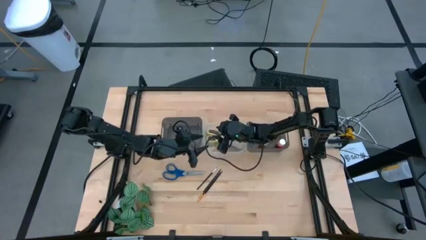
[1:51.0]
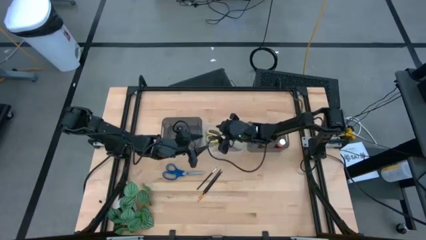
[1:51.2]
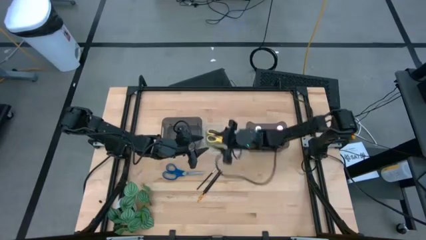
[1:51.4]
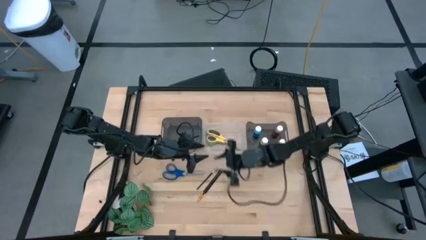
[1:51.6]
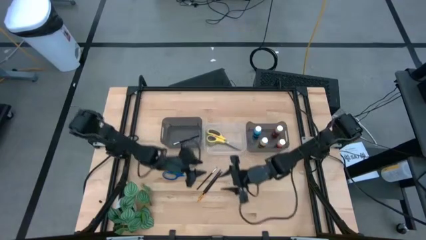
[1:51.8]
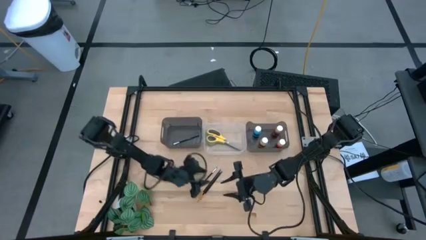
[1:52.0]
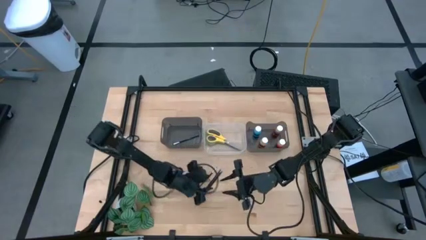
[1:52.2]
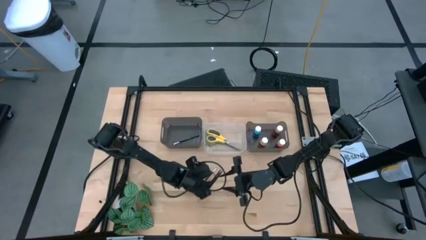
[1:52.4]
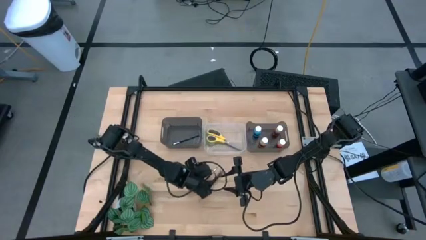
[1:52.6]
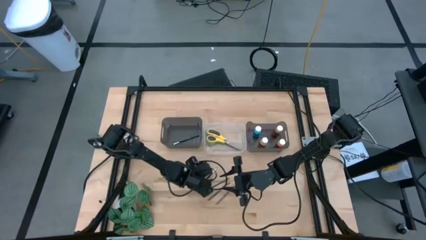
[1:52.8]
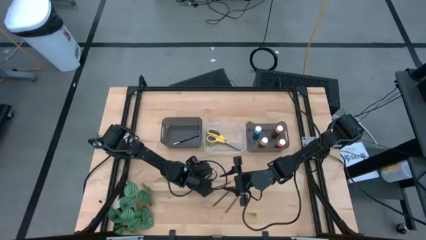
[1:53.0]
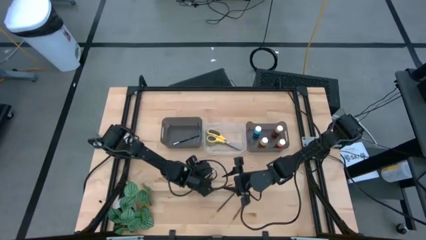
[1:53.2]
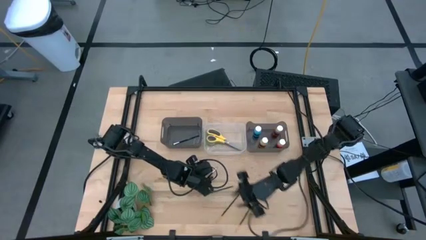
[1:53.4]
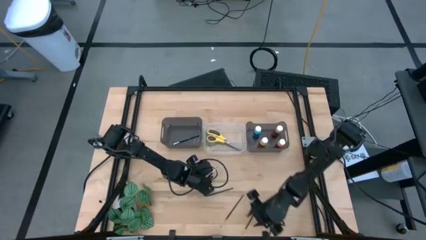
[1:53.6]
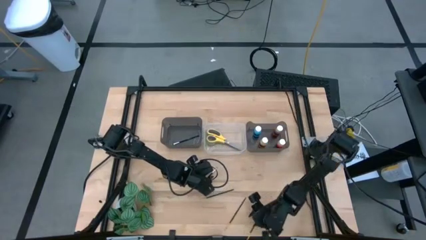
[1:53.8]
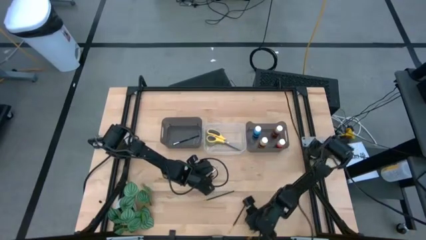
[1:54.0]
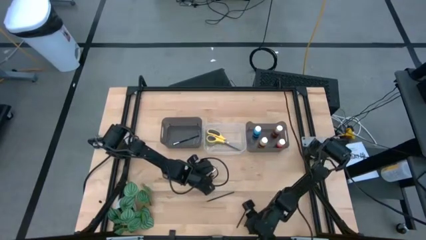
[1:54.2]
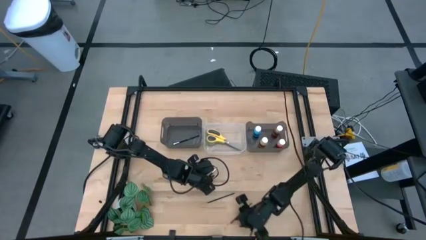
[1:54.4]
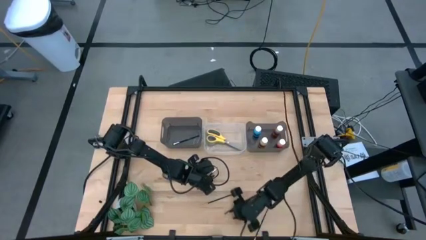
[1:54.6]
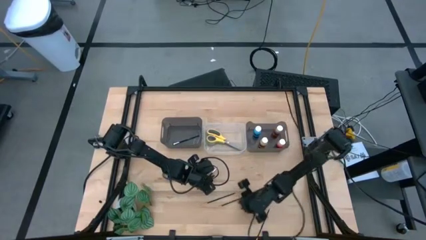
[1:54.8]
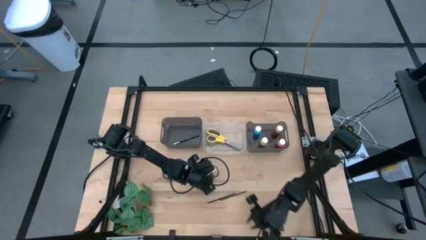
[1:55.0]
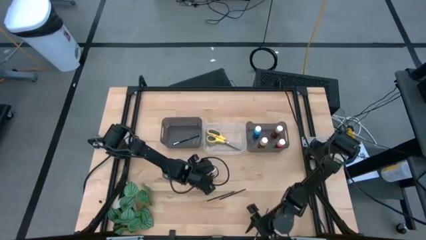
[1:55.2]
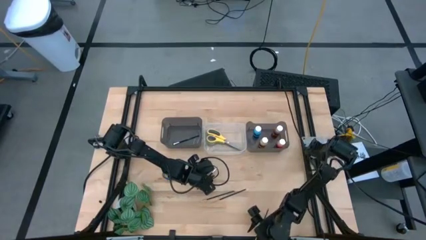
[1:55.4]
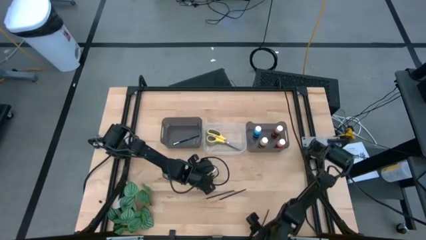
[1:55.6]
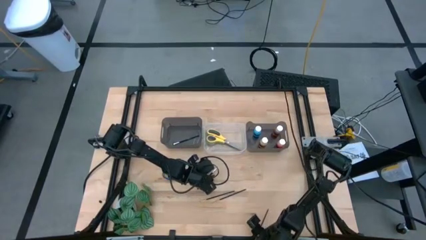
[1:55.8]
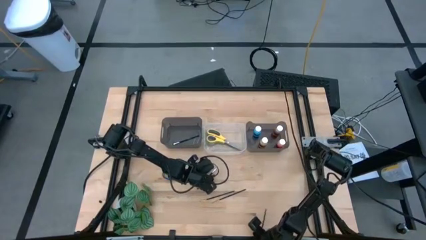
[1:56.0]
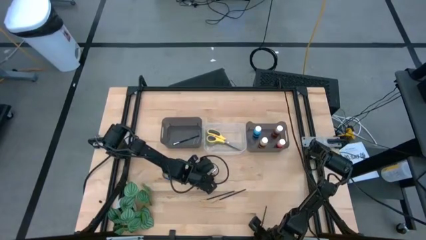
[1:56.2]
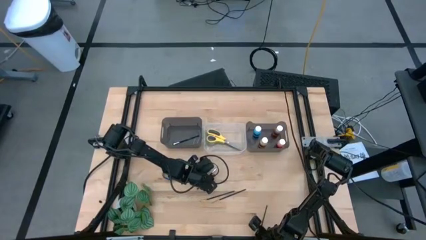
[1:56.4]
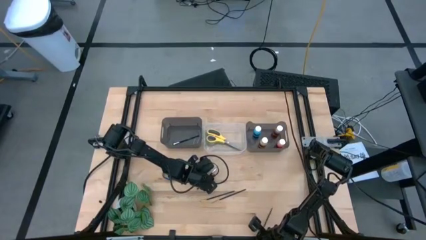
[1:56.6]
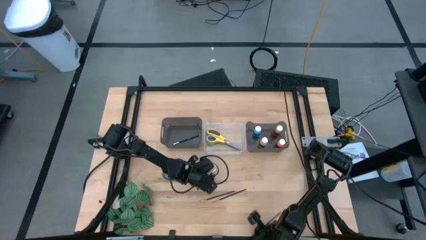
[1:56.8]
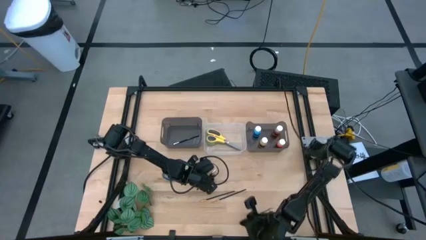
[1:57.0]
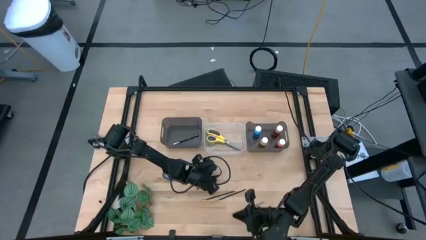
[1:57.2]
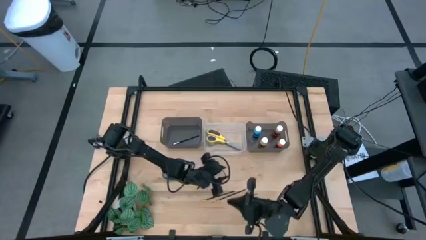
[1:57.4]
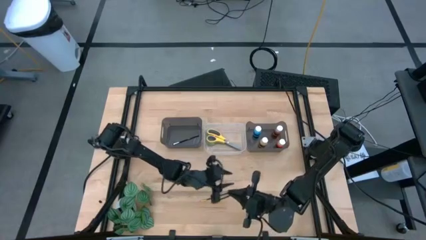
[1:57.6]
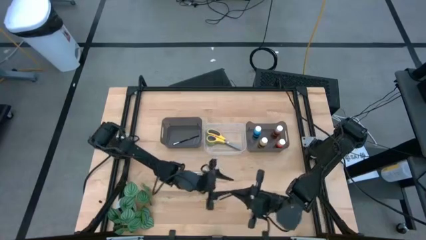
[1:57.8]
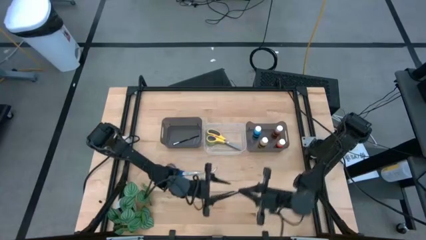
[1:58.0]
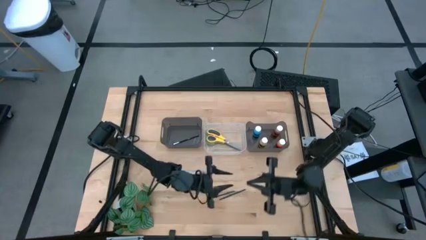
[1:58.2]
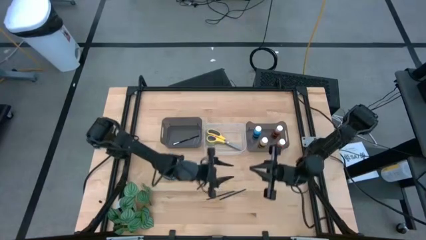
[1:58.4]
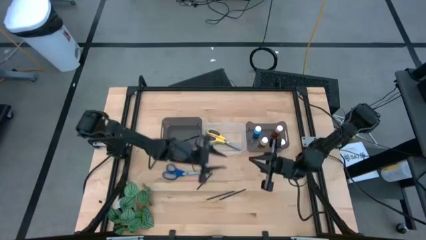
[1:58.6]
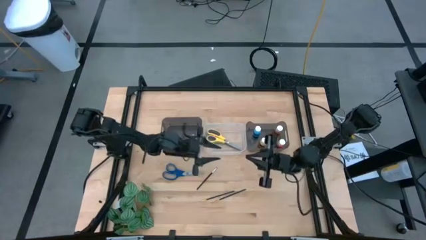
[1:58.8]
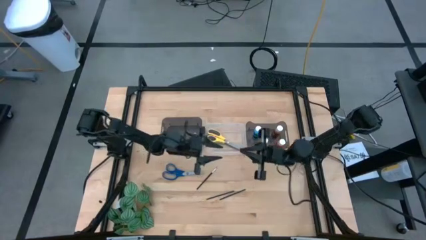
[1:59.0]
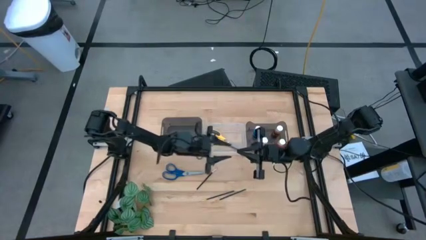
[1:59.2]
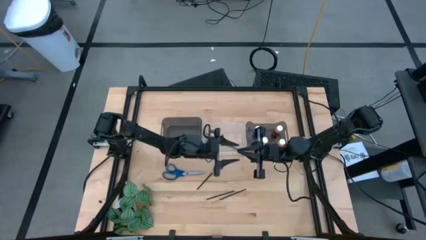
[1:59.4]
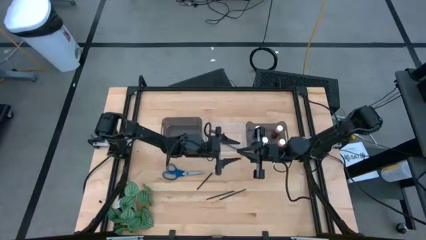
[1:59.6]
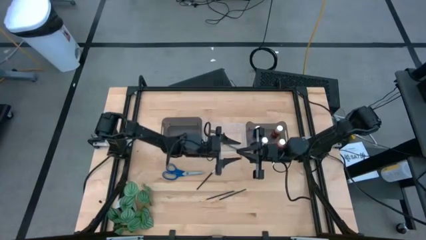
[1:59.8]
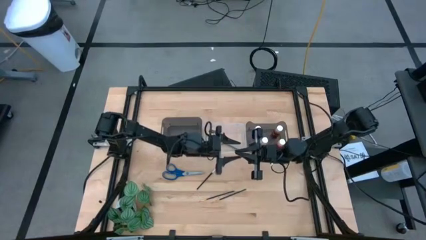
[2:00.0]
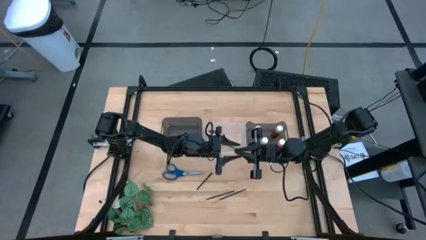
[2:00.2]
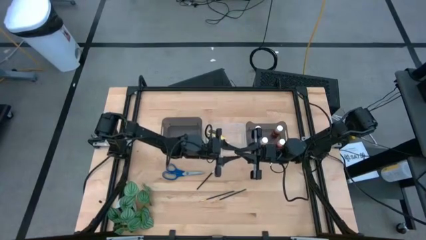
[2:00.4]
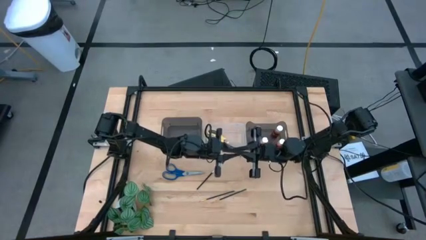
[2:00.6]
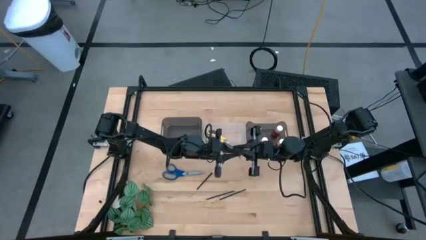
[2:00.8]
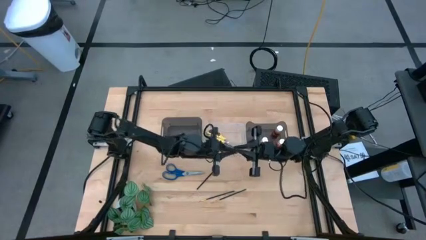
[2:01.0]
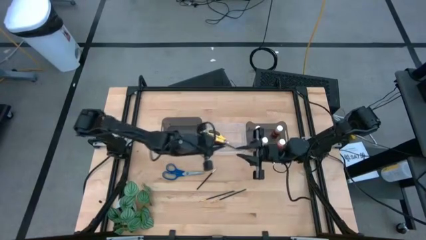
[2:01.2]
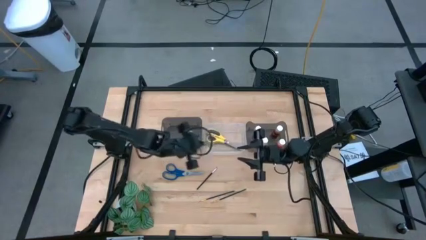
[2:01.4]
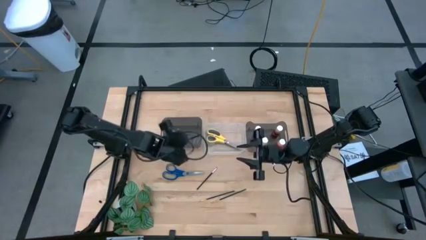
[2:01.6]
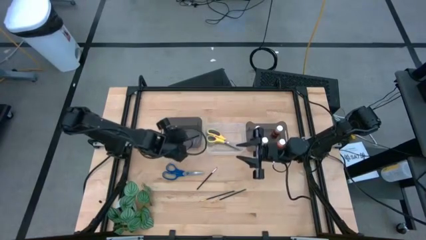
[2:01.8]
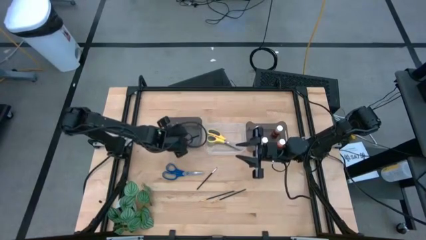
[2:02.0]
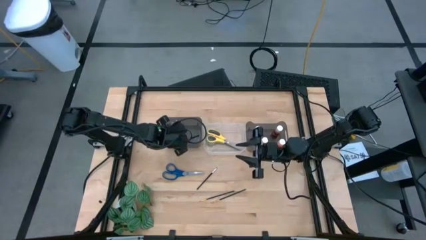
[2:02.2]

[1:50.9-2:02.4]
Task: Pick & Place Paint Supplies
Put the bottom gold paint brush into the left black bin

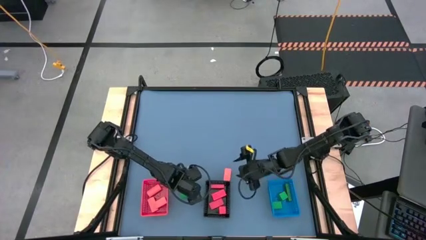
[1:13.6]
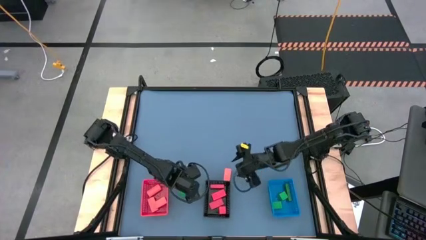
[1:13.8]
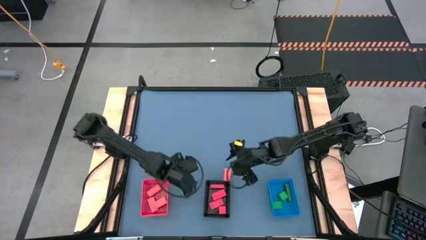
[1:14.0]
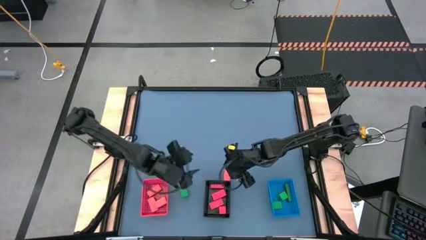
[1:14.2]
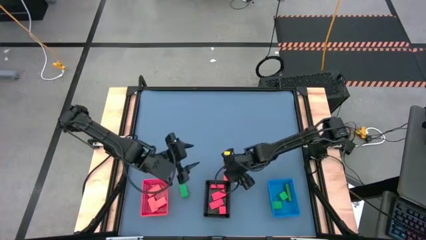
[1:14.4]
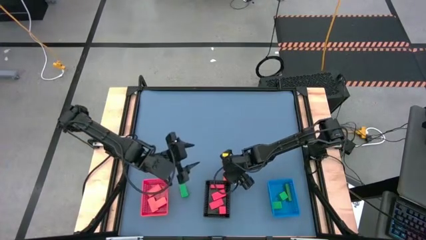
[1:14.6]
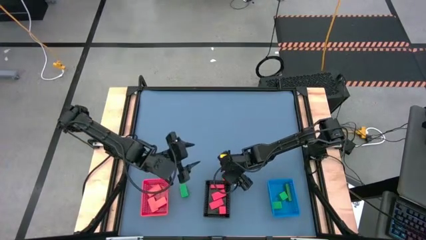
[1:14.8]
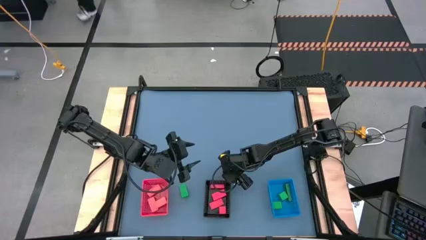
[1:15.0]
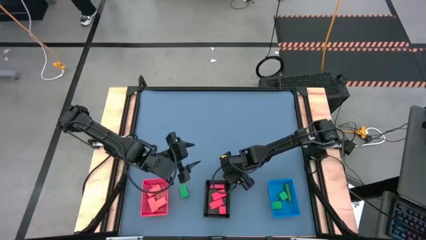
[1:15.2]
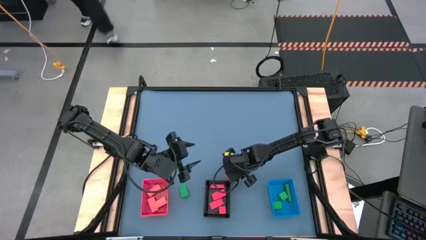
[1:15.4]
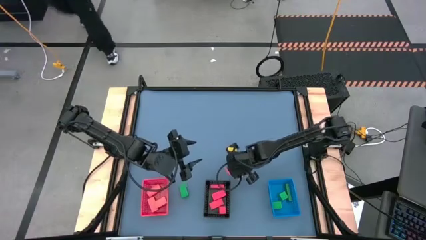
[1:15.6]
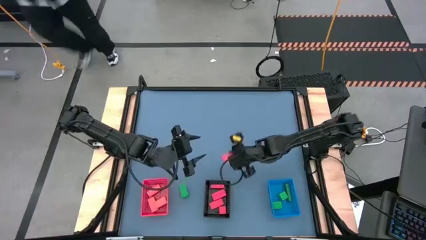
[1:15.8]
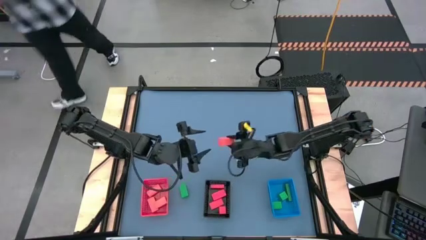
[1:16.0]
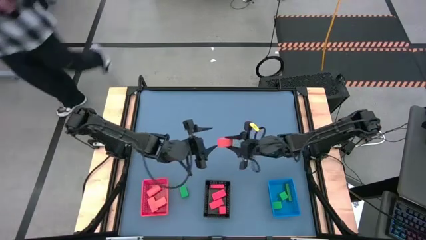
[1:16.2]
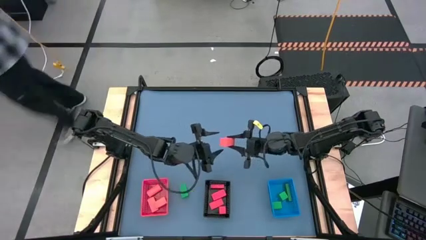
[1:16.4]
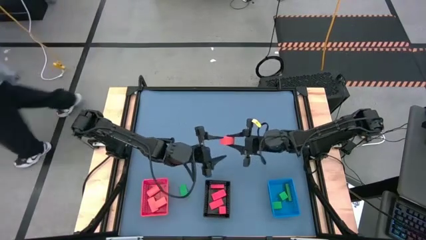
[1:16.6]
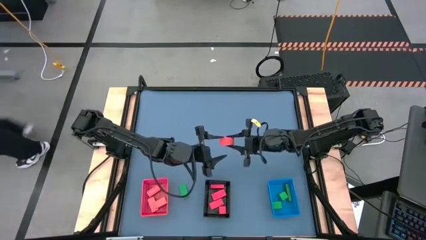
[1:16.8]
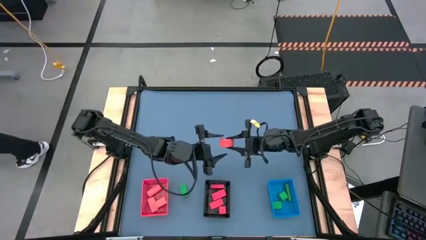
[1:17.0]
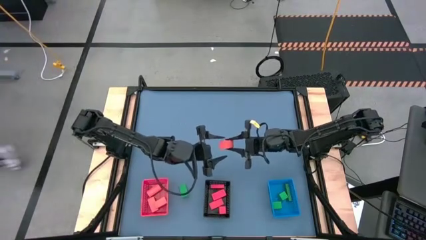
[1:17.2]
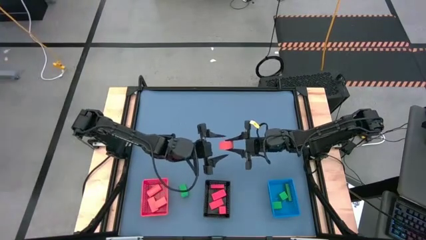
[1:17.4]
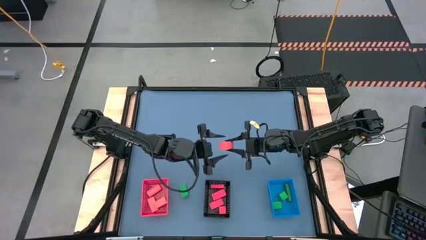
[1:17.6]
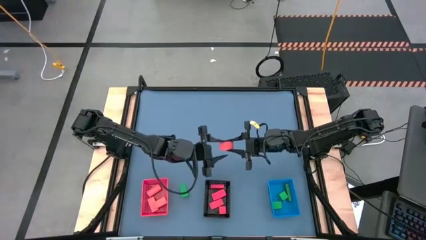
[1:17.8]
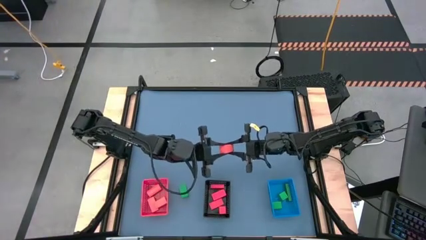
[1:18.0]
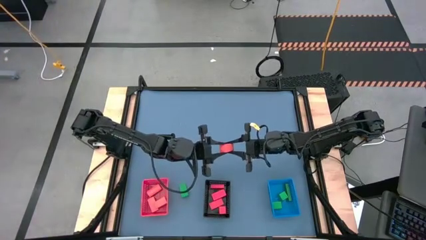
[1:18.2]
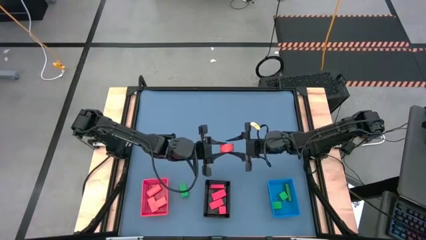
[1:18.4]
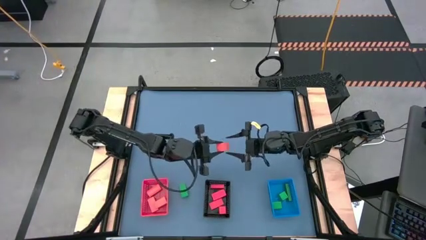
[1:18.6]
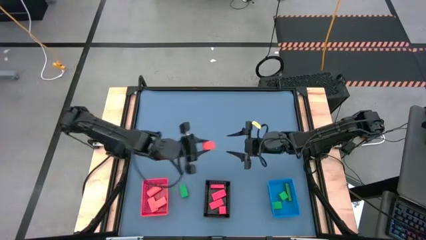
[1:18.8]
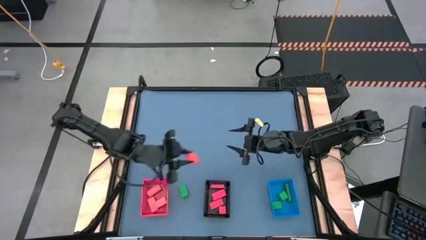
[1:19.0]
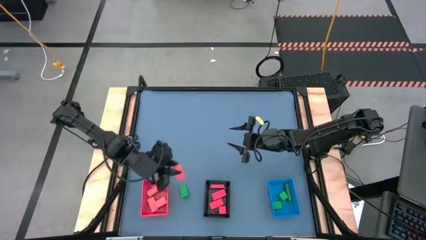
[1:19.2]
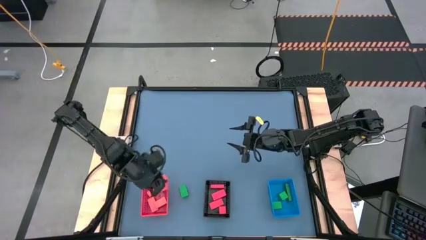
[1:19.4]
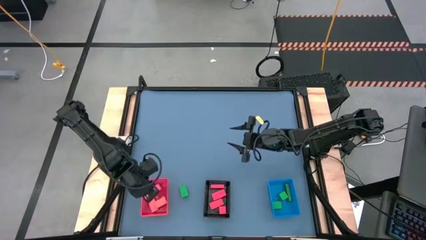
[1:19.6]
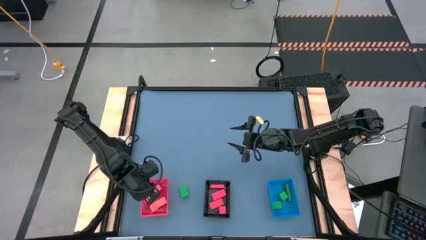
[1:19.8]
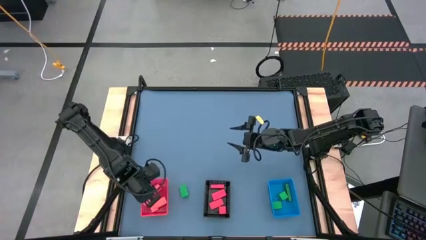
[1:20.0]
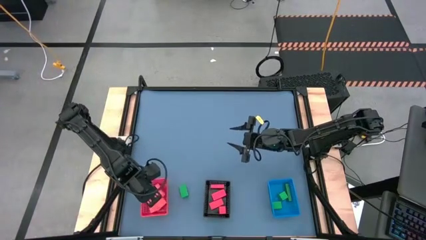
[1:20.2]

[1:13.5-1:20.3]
Task: Sort & place blocks by color
Put the orange block into the red bin
